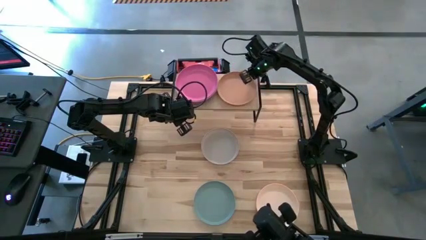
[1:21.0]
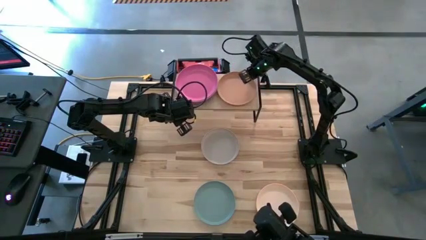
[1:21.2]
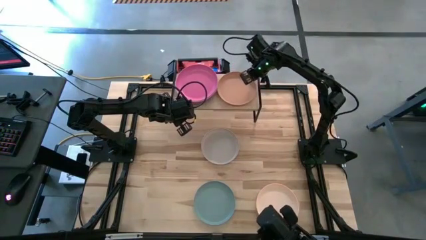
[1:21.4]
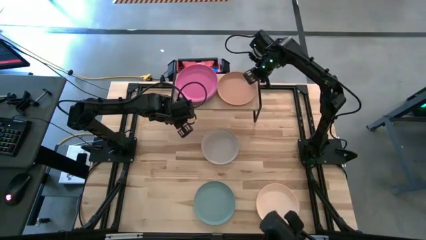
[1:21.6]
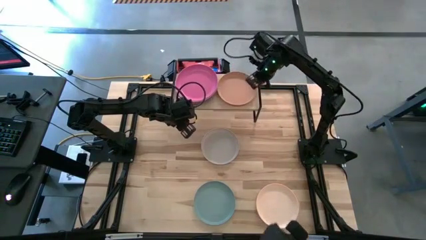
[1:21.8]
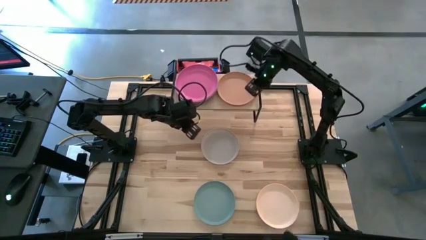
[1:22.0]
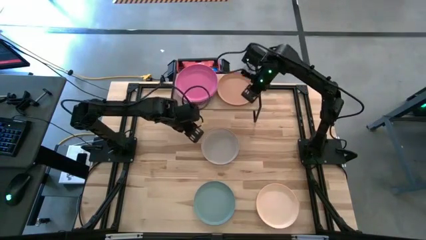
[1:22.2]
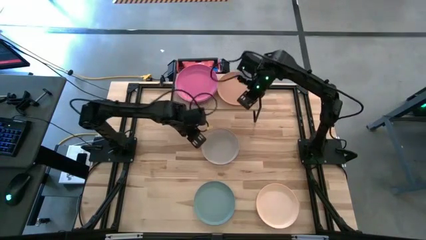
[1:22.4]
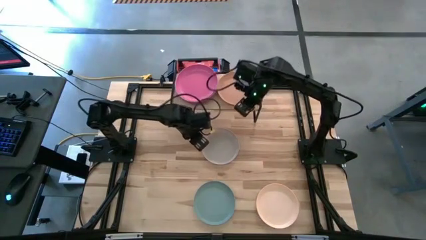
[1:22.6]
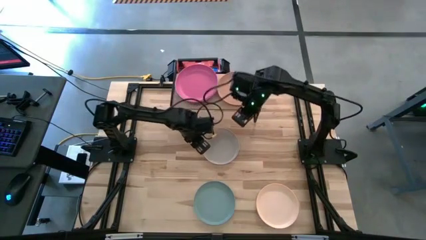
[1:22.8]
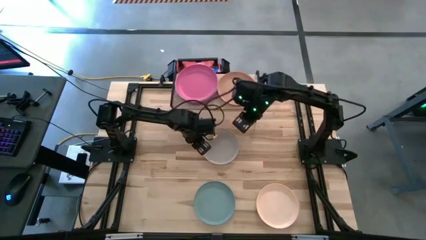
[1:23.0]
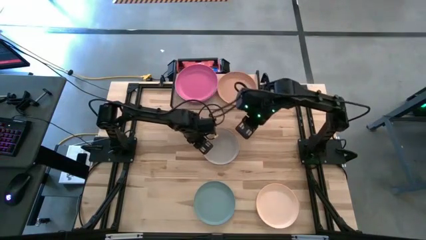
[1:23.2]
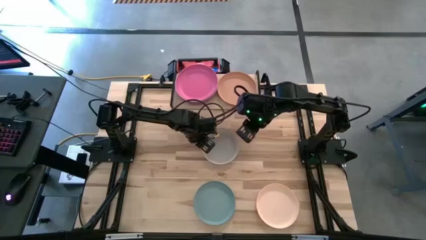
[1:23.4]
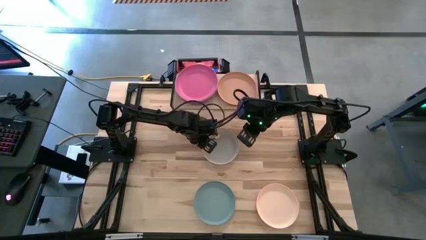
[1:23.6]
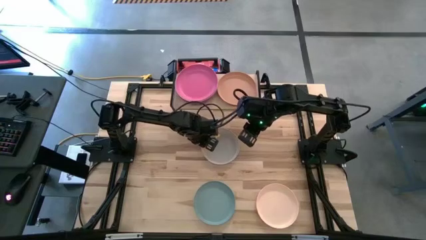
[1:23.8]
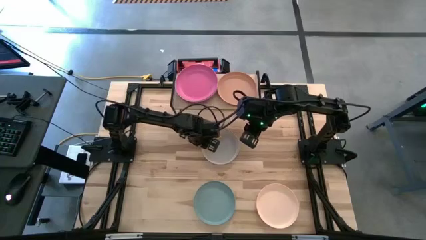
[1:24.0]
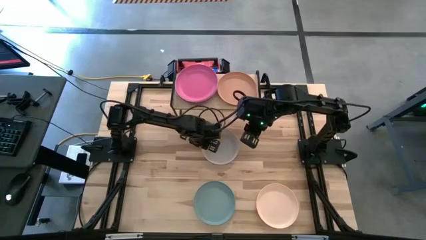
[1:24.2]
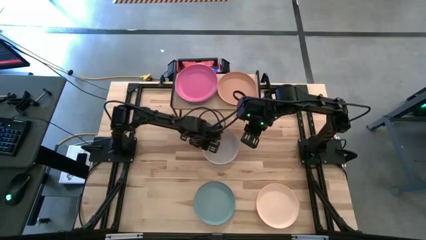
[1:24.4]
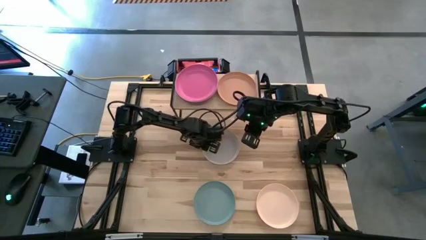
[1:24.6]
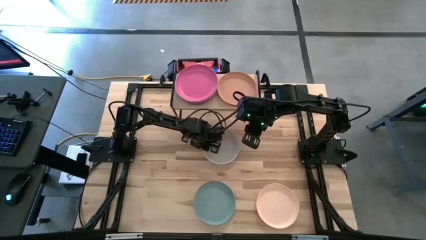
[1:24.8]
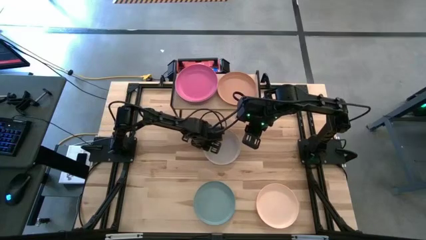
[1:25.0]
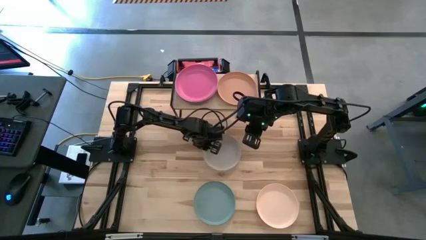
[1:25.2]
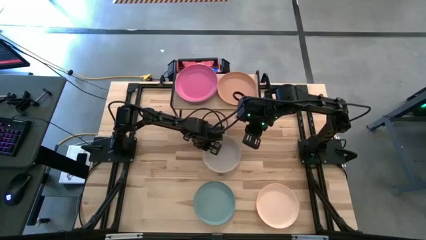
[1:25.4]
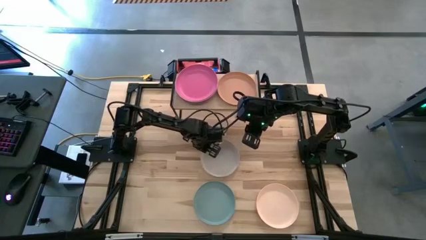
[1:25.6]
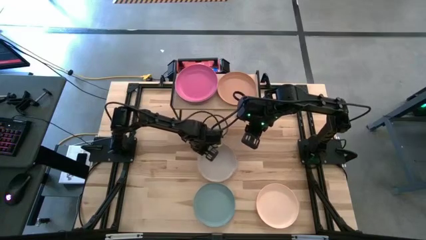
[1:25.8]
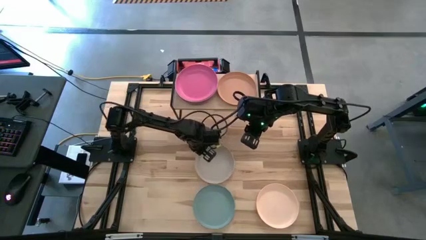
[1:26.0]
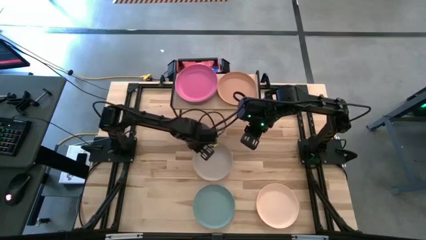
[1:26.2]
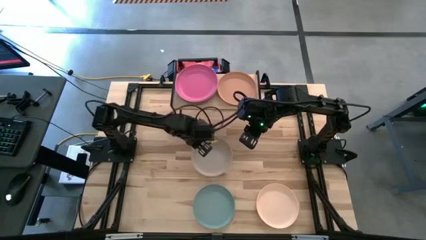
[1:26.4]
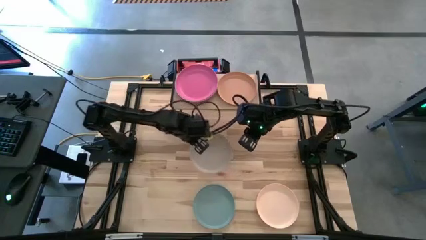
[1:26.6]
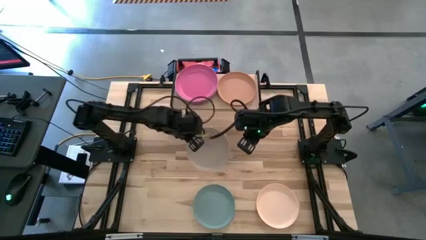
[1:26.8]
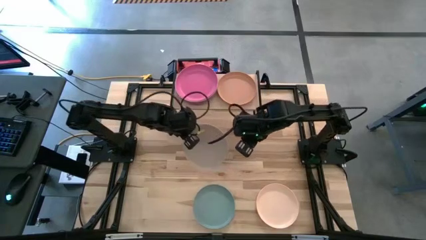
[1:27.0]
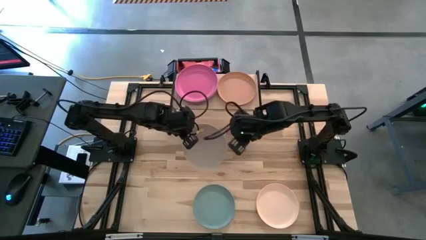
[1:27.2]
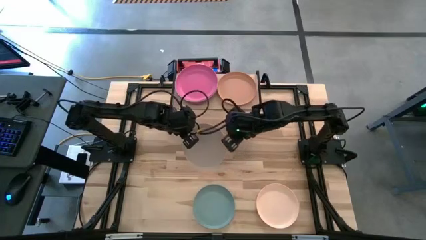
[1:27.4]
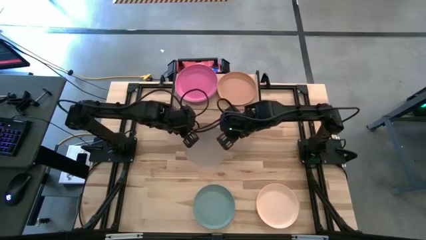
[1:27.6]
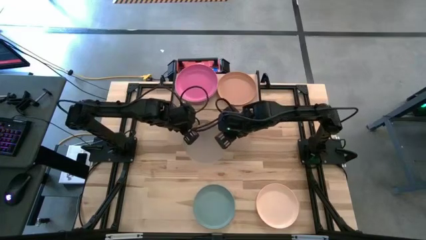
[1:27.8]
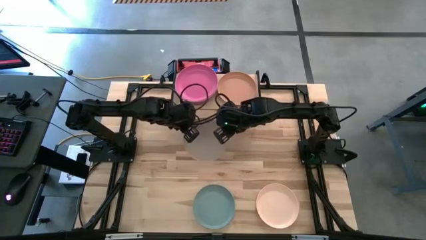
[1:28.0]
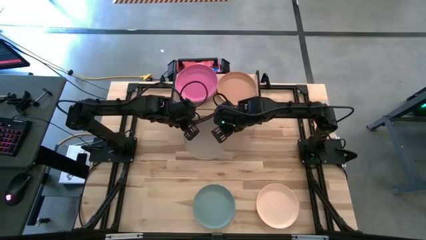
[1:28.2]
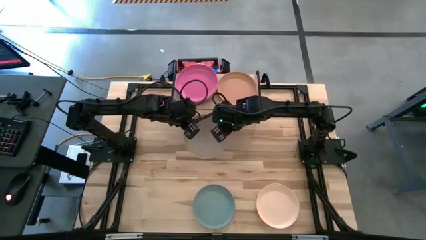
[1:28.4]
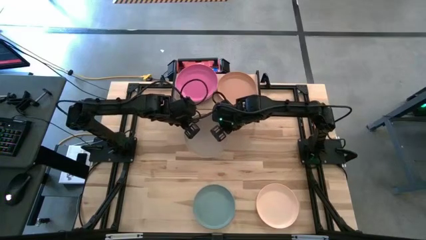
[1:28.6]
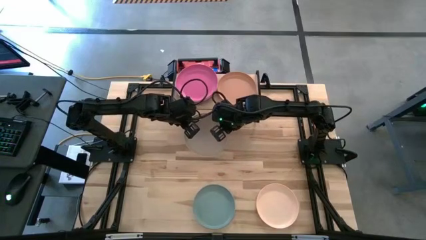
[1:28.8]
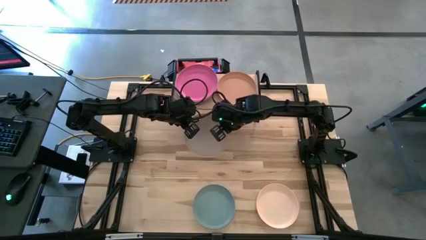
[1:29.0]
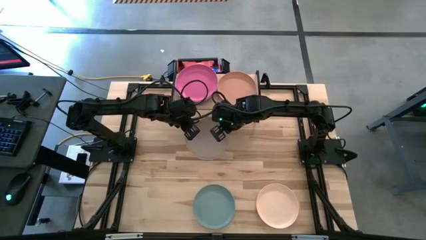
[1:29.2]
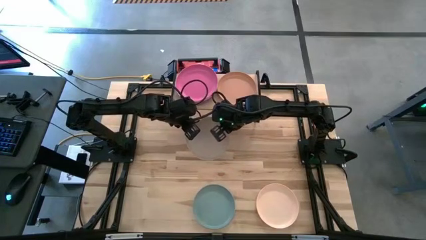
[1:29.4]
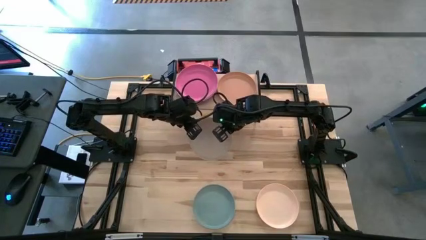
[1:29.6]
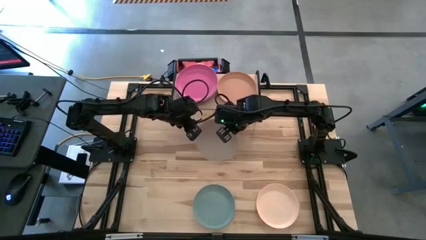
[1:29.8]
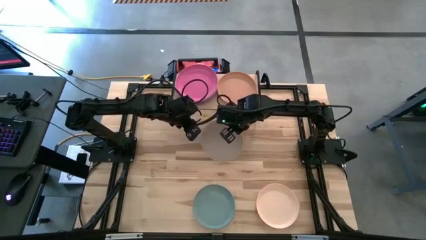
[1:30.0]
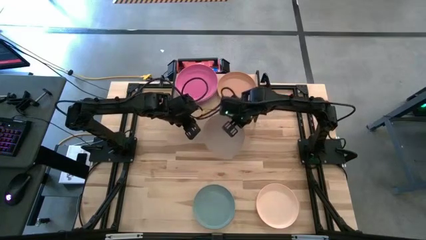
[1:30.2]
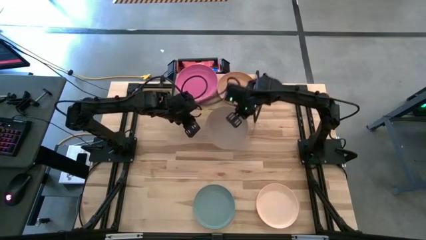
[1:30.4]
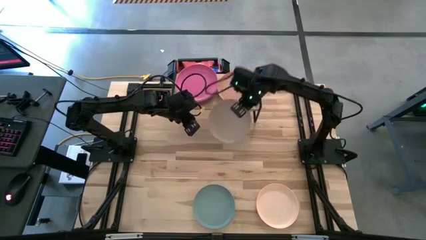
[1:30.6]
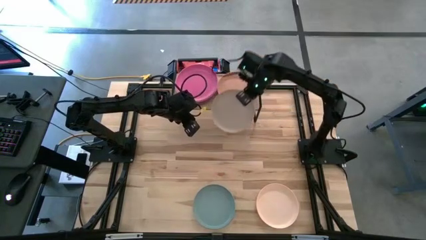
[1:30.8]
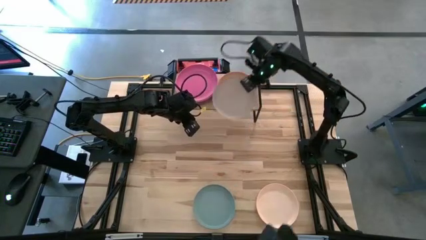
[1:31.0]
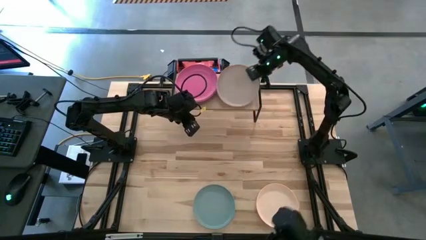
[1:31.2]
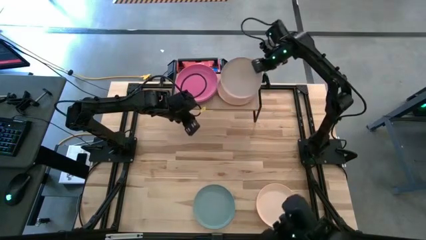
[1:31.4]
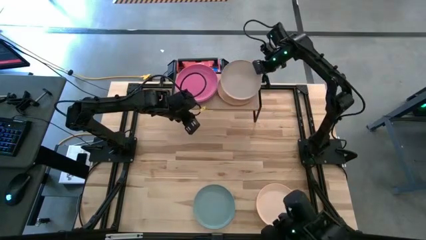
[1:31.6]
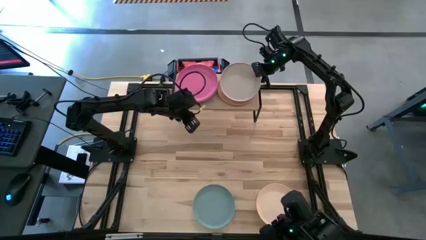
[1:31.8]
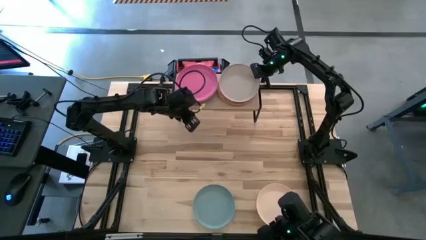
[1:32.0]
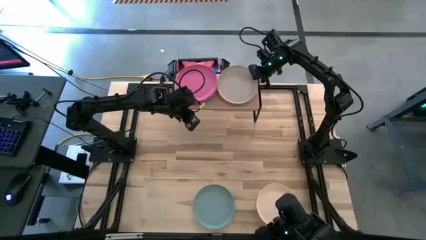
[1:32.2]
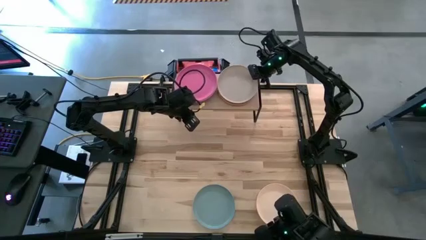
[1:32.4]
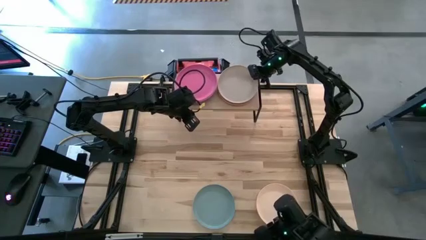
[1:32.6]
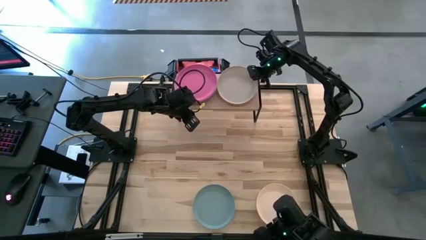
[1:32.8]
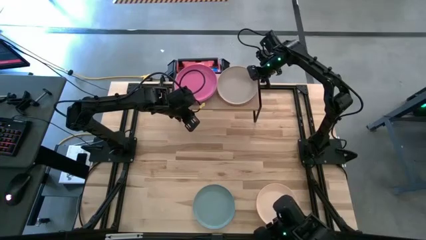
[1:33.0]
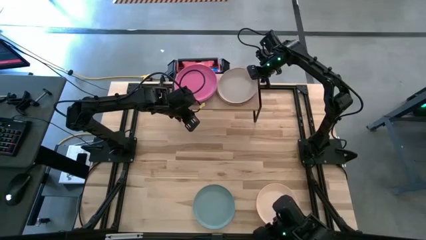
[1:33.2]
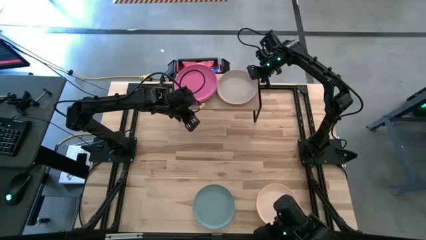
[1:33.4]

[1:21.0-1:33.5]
Task: Place and stack plates onto a shelf
Stack the light gray plate on top of the brown plate on the shelf

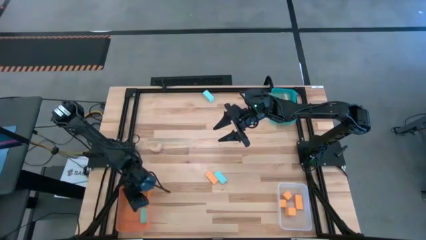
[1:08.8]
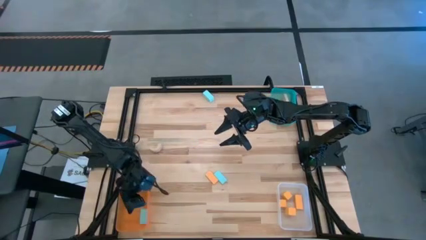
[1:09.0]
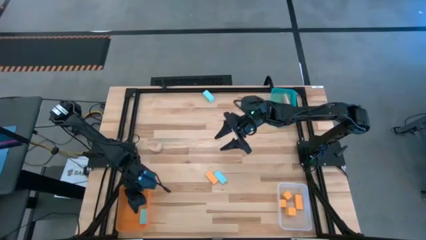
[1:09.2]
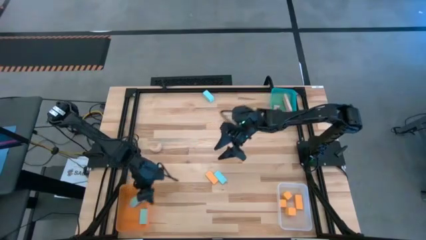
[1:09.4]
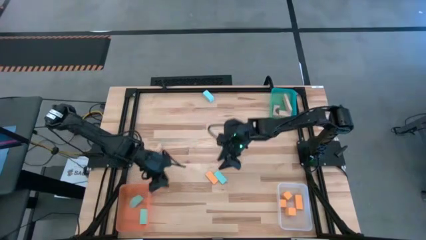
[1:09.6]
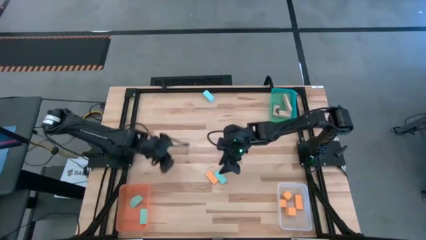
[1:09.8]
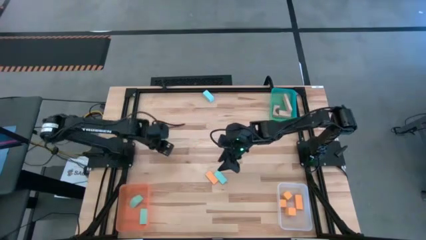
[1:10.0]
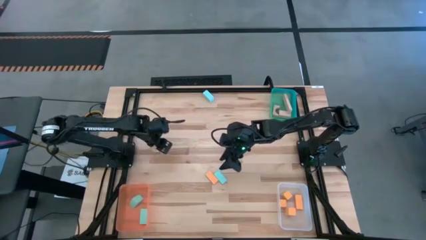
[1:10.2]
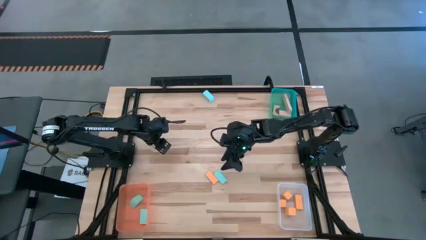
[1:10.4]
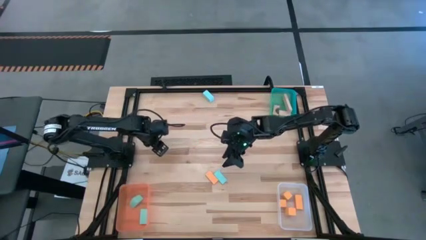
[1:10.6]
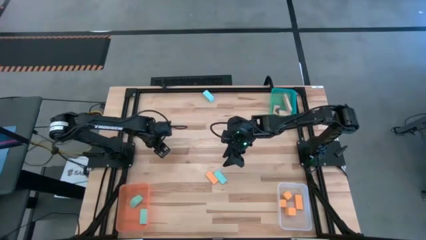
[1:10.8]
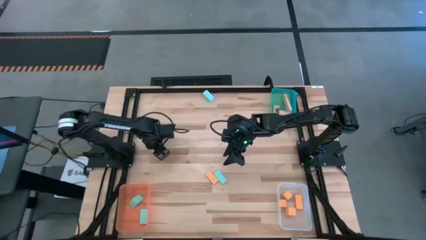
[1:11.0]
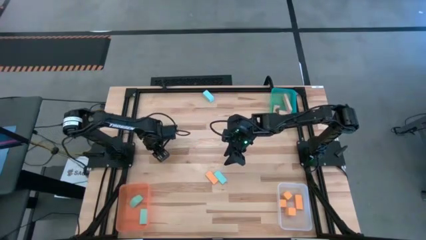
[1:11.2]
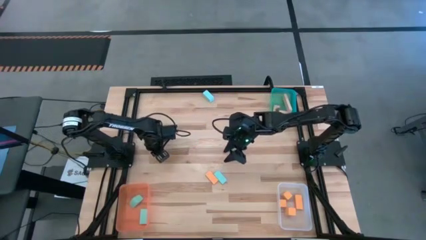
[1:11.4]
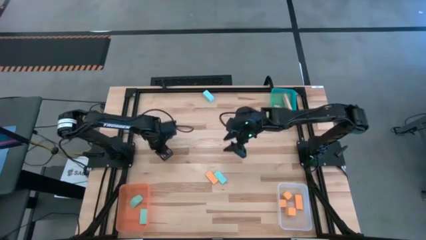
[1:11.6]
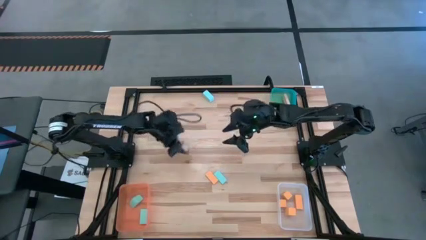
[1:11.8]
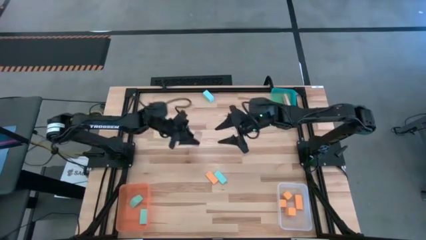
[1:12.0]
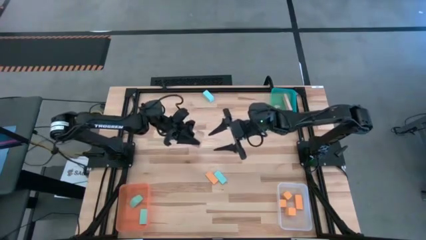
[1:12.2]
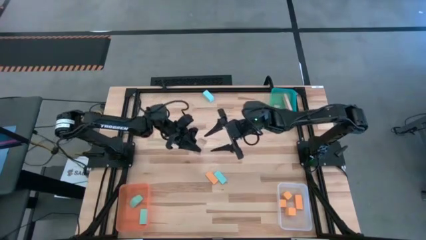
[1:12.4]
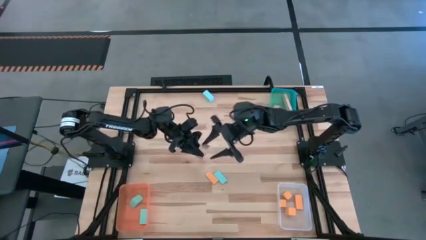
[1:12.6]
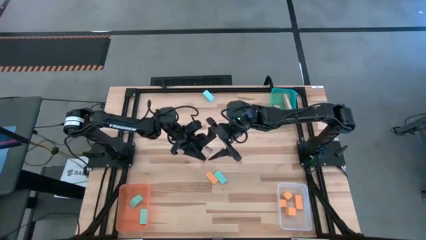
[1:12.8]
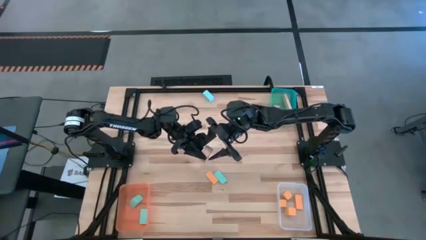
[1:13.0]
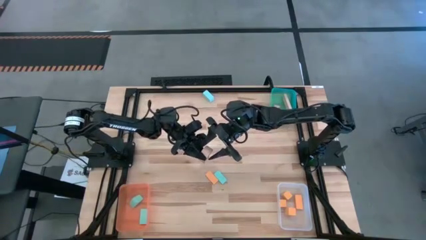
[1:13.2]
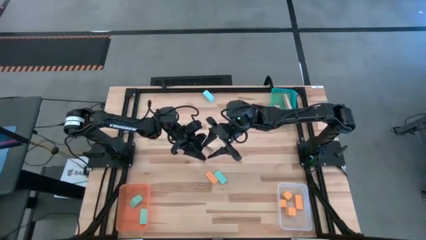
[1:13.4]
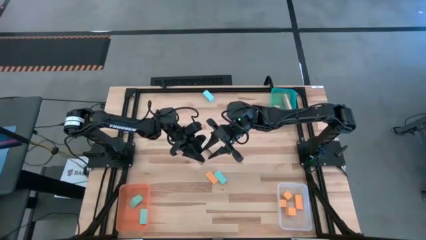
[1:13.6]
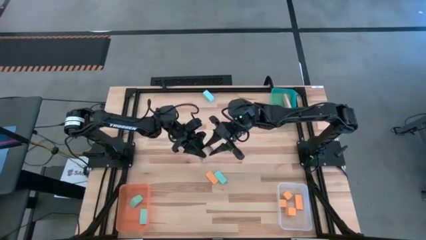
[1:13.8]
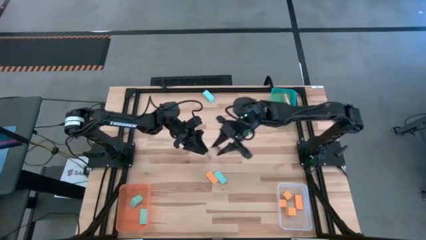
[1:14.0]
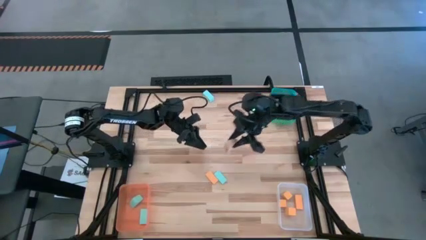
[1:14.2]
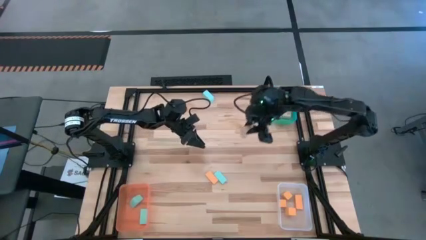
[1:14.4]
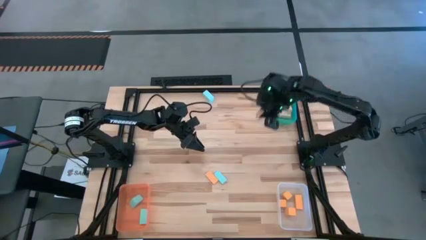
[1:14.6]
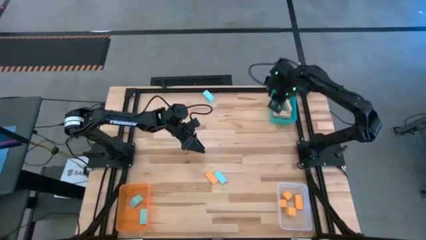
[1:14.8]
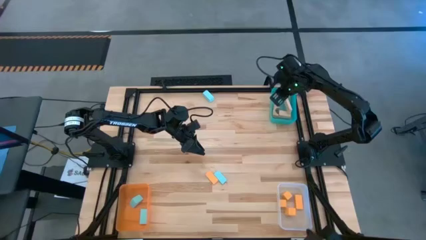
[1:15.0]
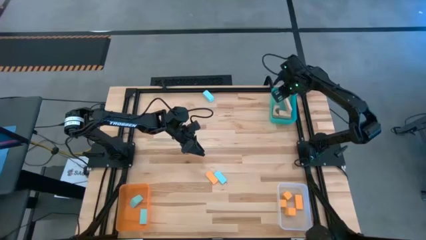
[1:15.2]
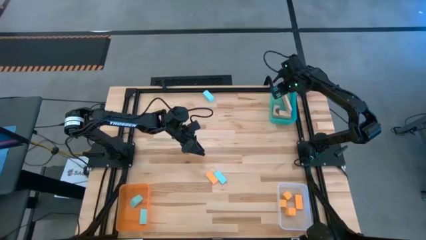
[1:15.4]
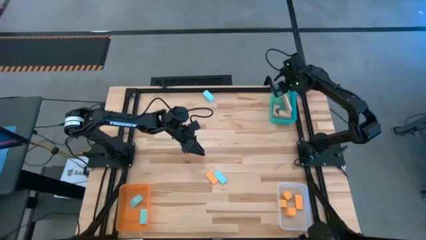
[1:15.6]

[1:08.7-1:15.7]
Task: Sort & place blocks by color
Put the brown block into the green bin
